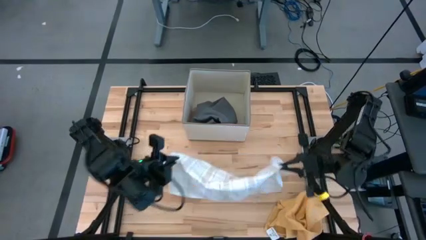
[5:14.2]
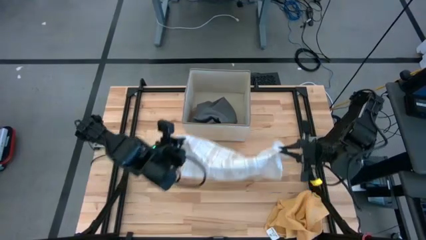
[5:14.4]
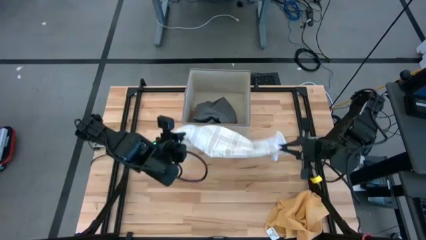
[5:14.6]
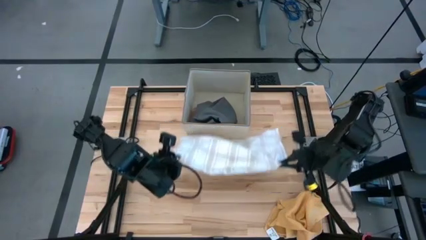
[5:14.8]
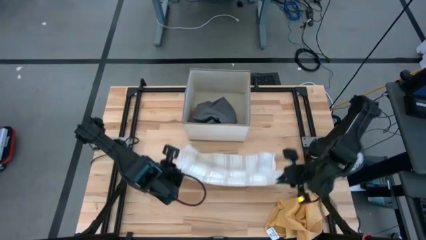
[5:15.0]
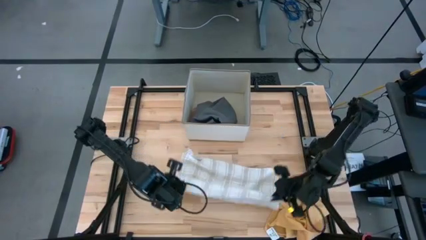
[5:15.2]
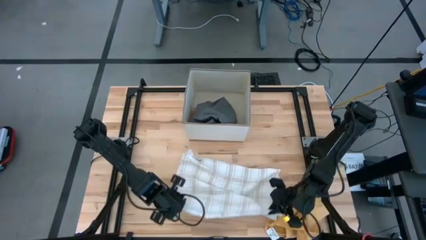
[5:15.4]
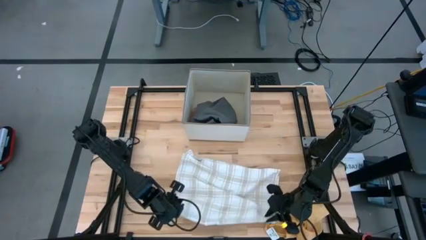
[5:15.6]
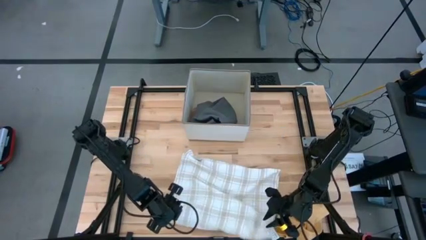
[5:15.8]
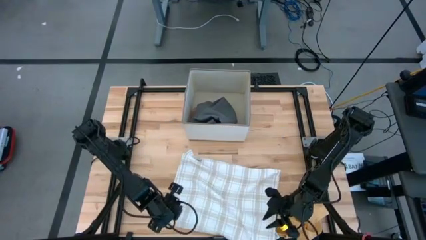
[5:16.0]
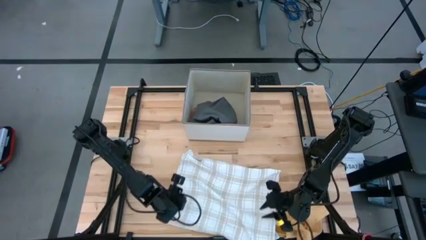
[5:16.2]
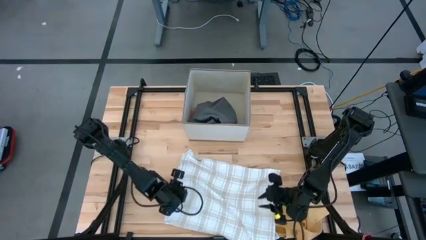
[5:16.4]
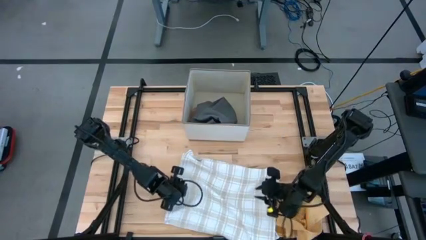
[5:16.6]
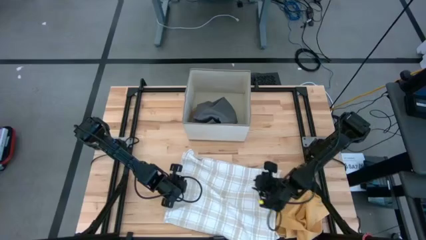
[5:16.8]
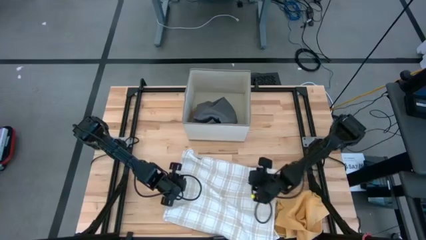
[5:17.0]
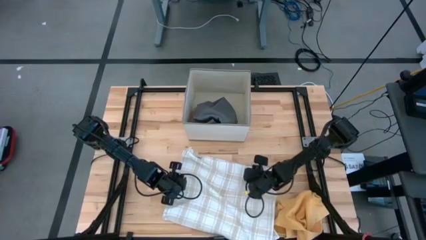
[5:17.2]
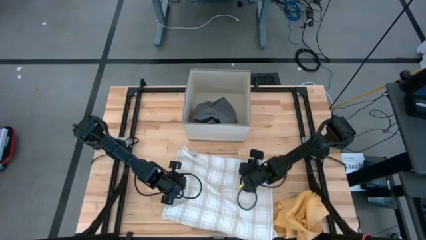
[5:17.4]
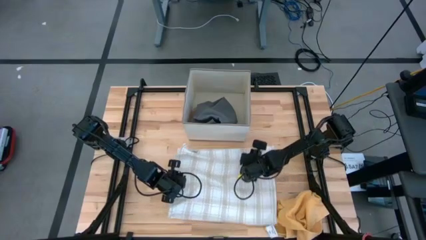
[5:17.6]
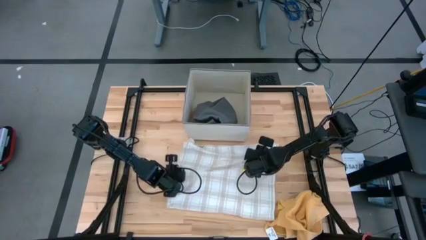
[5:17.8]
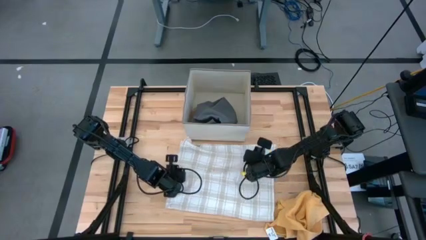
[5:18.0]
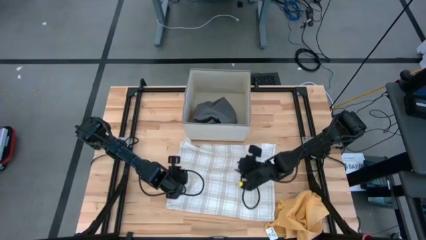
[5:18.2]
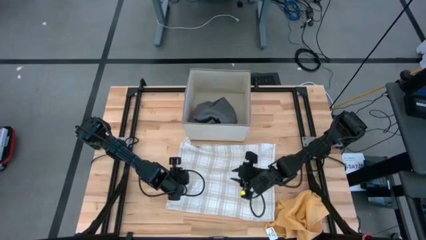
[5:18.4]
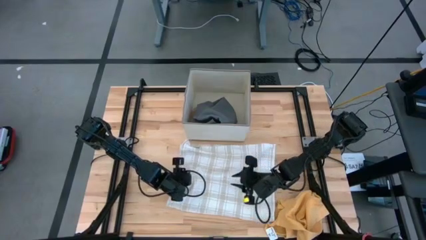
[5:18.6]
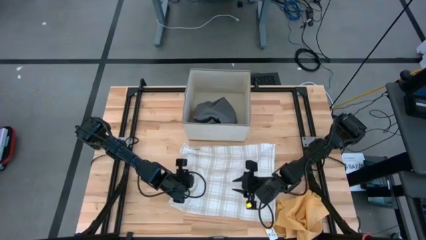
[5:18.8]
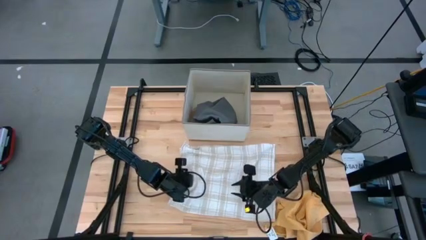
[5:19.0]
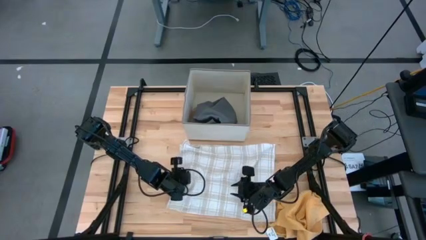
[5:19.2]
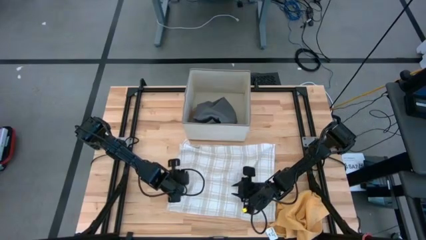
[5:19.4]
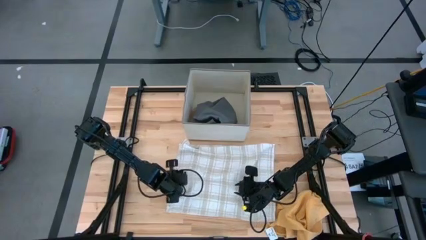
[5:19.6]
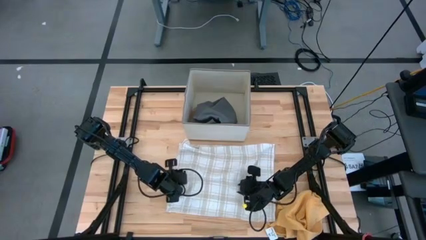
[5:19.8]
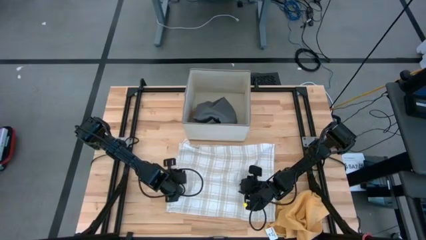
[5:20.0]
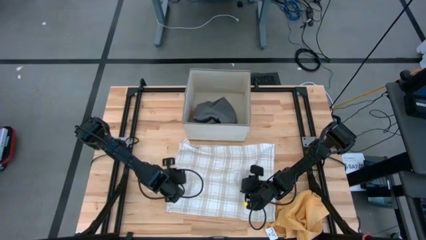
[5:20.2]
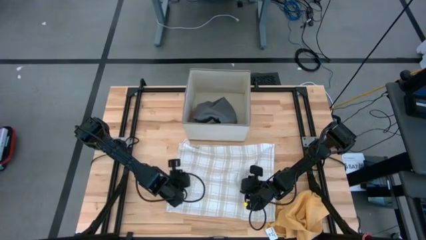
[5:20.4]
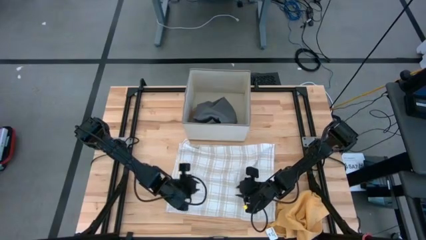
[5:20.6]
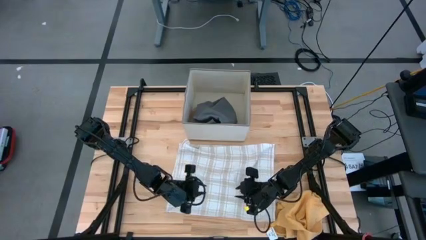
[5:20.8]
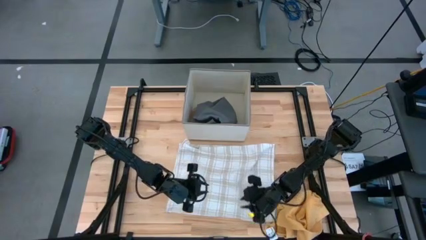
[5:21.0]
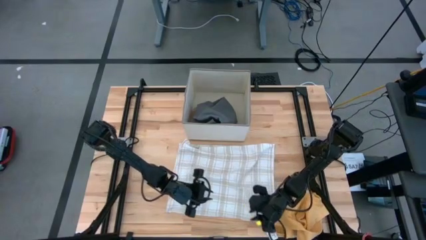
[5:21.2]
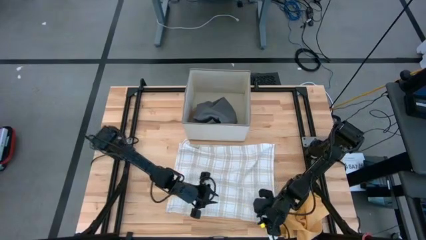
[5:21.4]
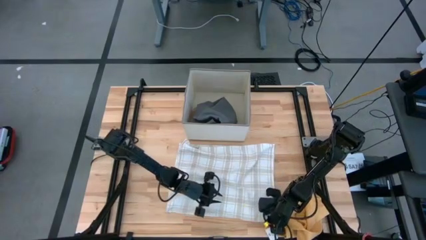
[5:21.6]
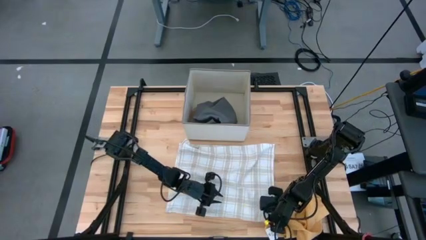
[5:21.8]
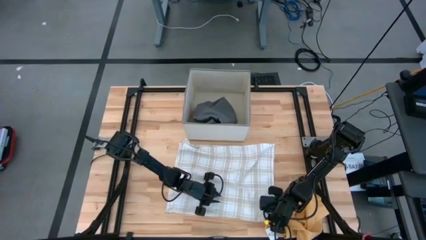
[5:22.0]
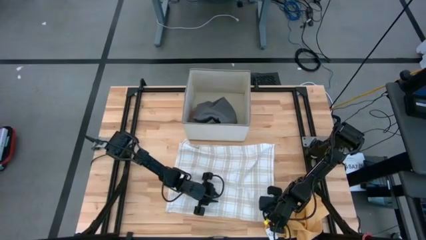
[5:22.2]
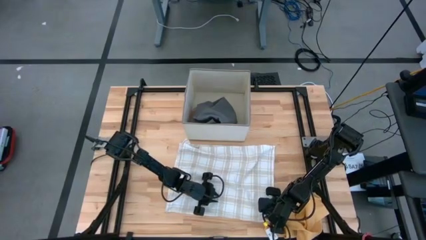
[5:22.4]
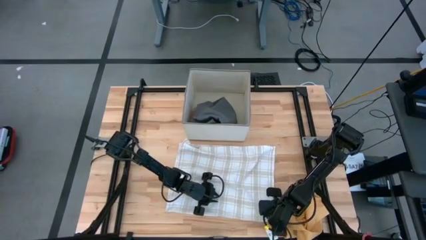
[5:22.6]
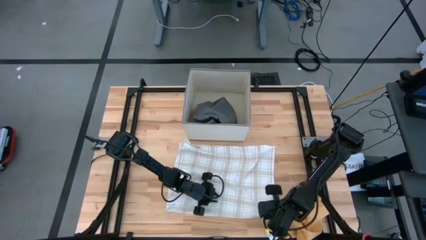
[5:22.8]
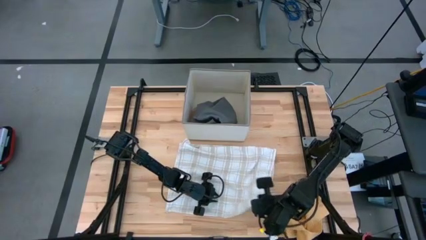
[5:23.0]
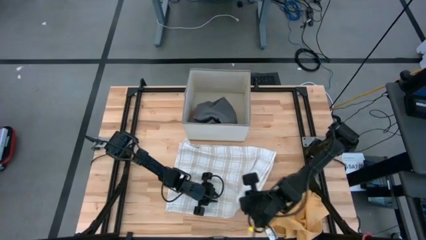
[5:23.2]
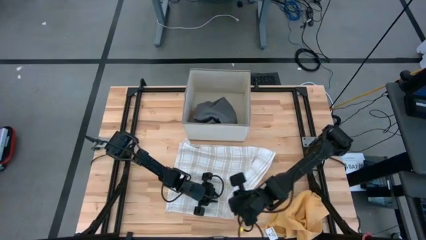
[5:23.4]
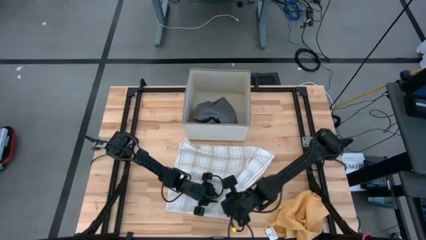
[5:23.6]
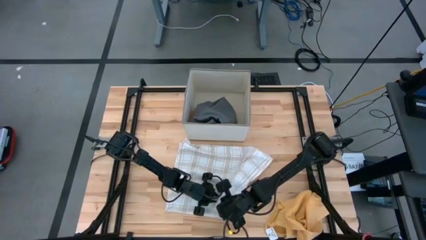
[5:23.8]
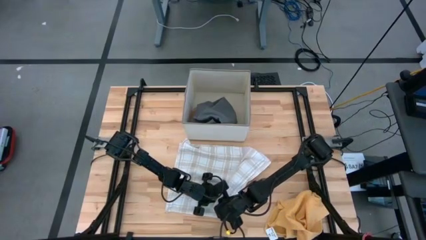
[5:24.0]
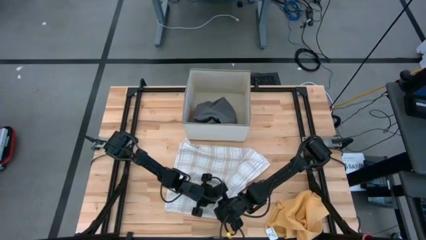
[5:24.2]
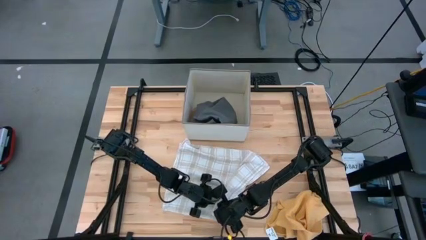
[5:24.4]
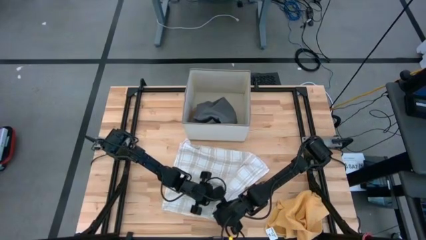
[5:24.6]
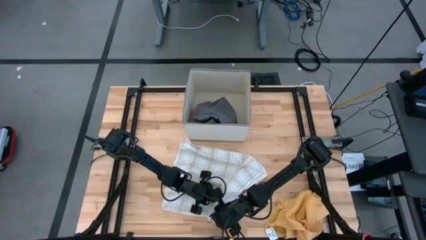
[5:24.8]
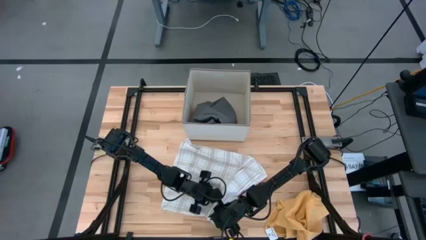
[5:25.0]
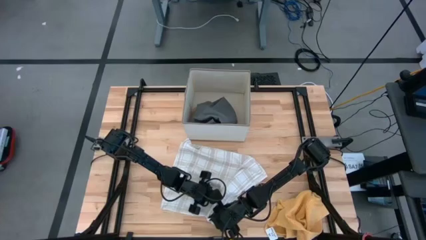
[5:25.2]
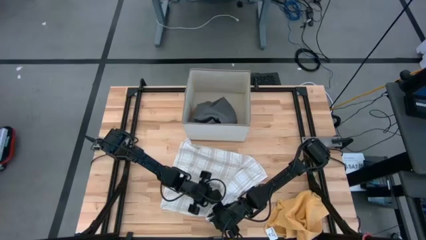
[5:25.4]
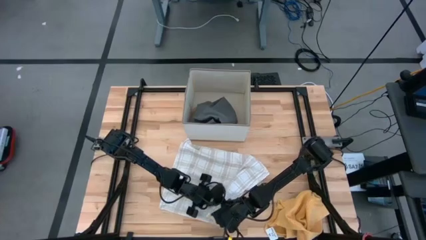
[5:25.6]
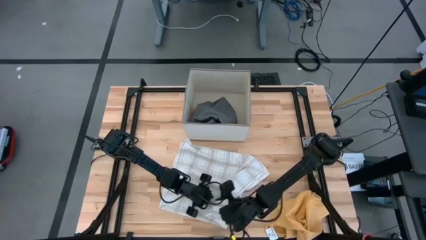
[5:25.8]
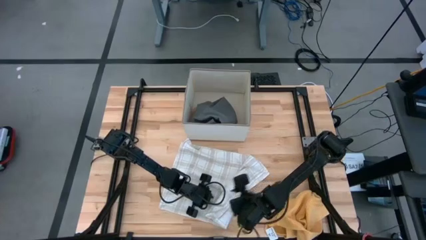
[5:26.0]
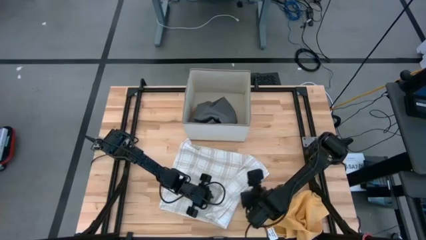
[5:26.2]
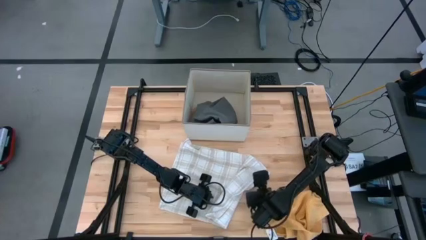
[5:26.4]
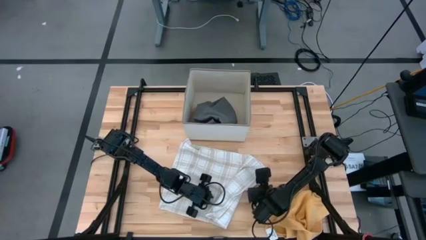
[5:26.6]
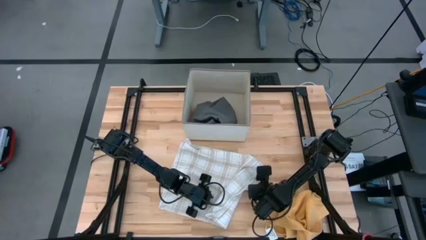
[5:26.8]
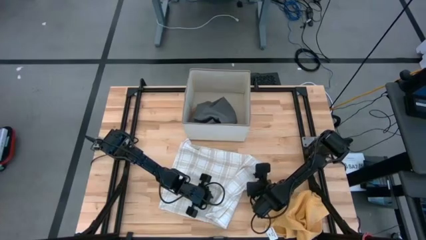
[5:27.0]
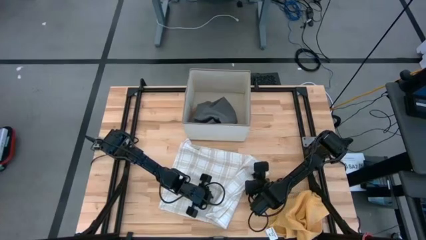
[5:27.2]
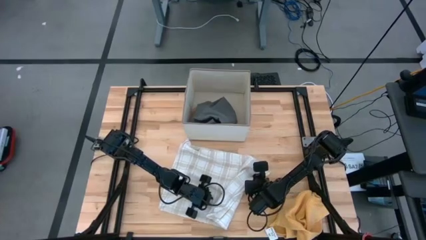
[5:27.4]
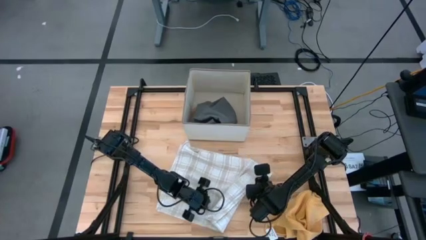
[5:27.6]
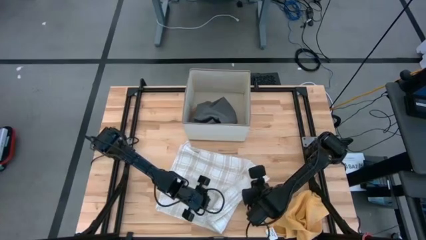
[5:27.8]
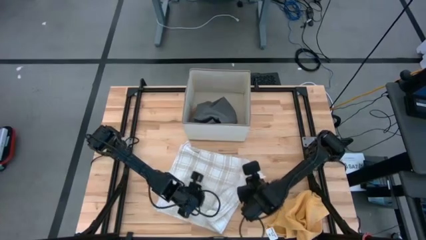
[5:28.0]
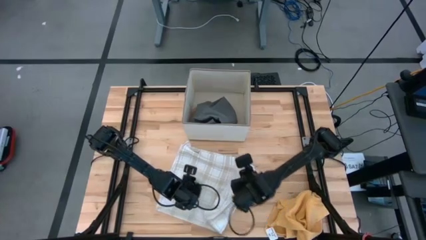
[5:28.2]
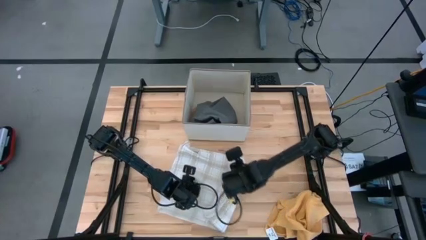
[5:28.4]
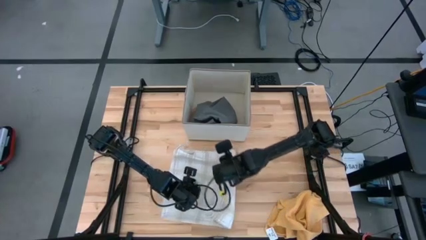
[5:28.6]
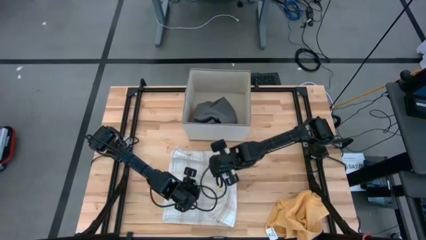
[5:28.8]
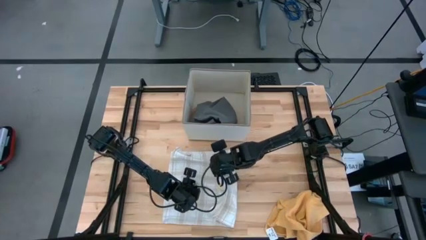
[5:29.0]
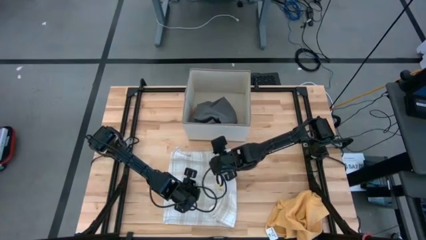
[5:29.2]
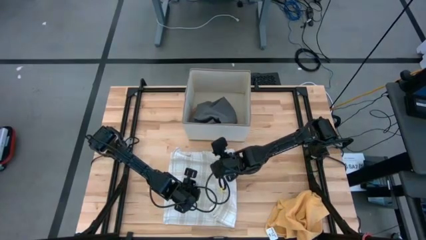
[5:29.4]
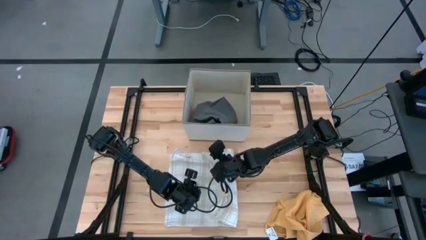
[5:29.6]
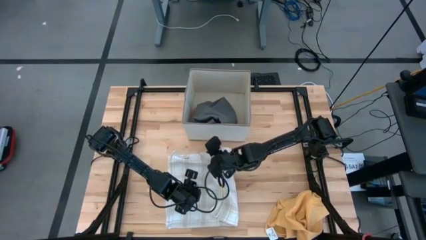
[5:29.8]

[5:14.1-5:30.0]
Task: Fold towel
Fold the white patterned towel

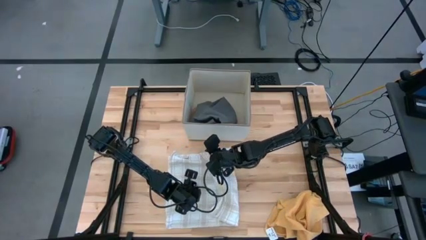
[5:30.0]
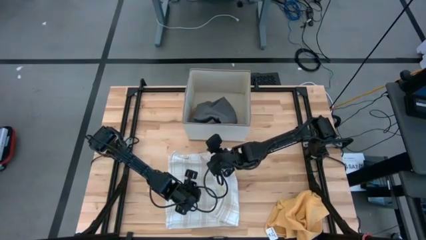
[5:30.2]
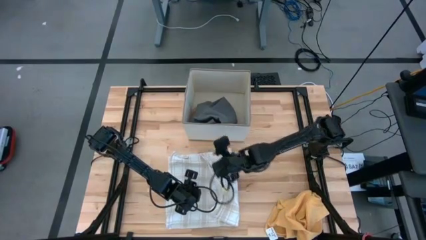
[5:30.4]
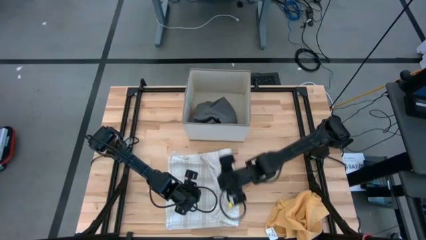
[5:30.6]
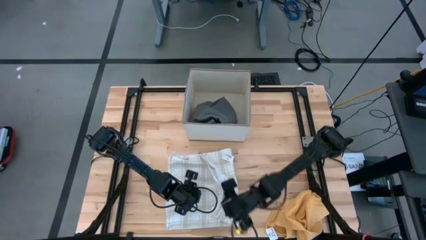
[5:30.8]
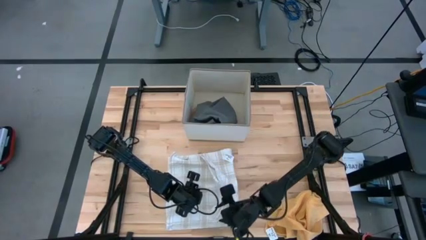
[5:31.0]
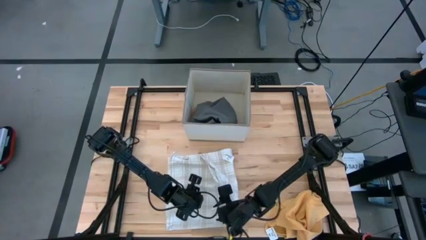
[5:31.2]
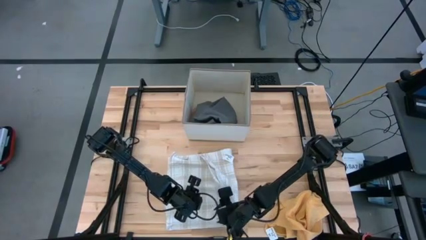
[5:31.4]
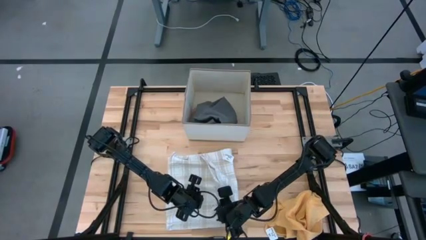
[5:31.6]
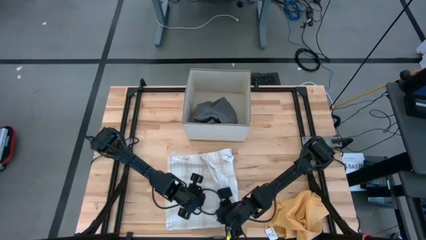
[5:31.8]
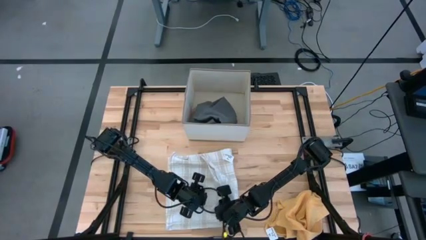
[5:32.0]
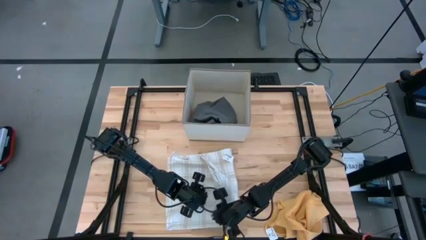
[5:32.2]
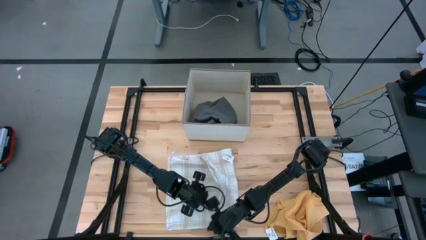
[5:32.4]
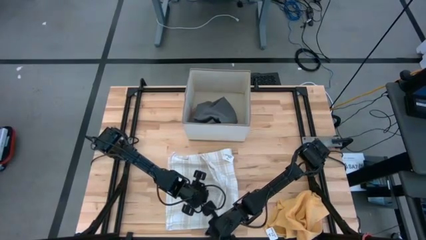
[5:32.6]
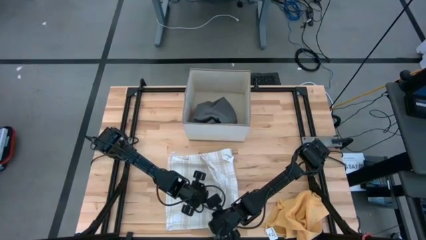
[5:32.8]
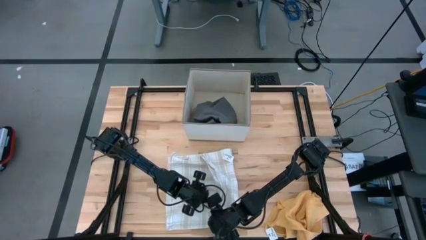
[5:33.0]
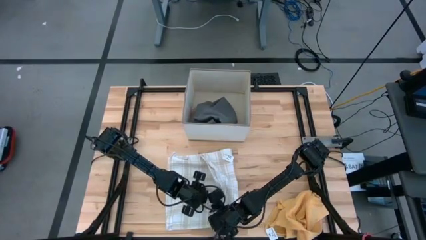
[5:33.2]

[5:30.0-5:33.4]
Fold the white patterned towel
